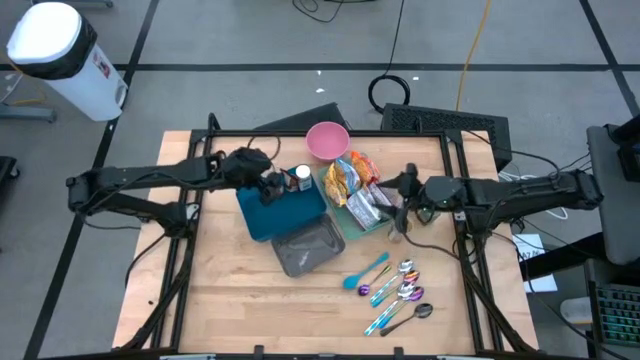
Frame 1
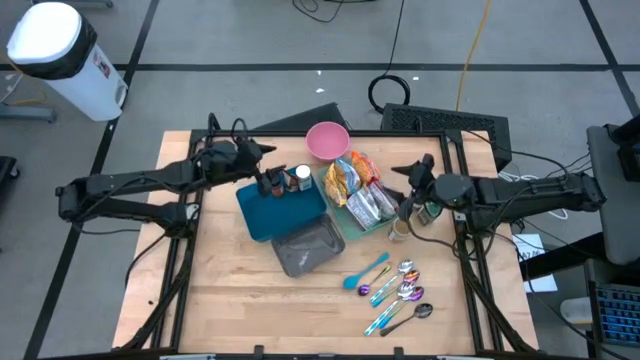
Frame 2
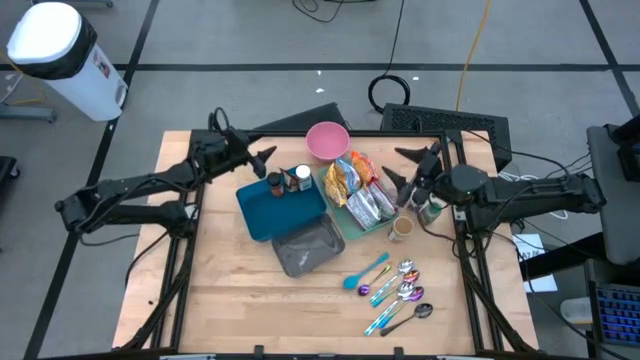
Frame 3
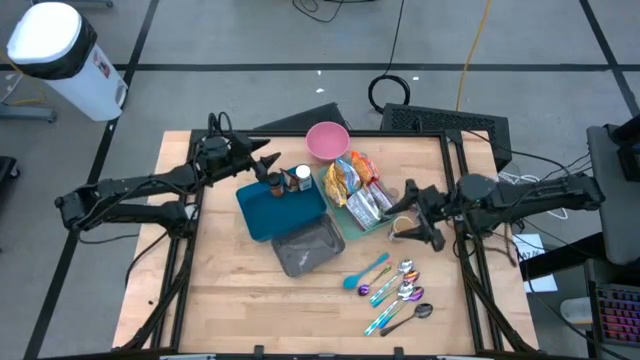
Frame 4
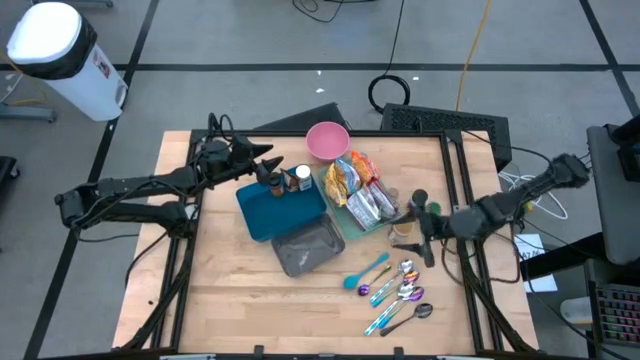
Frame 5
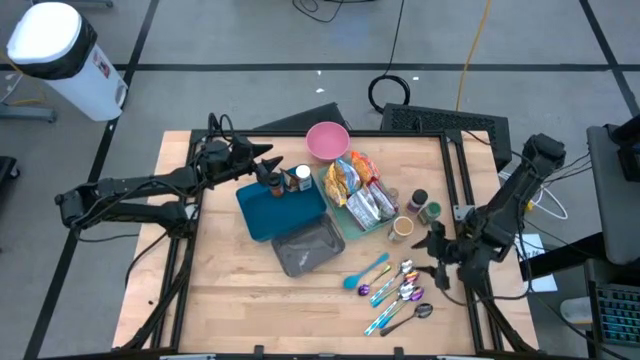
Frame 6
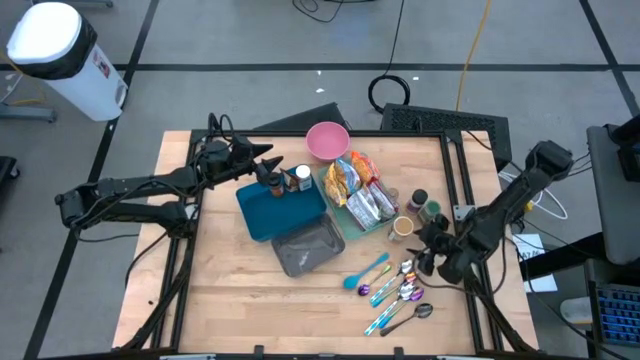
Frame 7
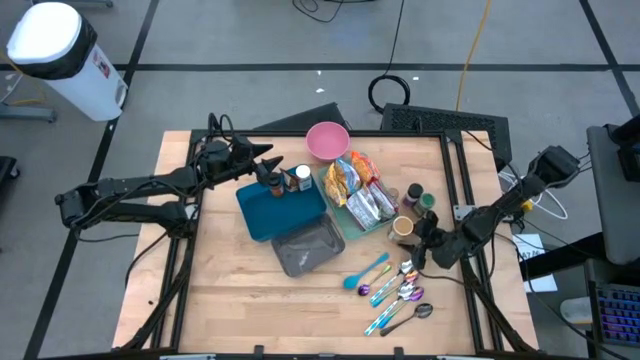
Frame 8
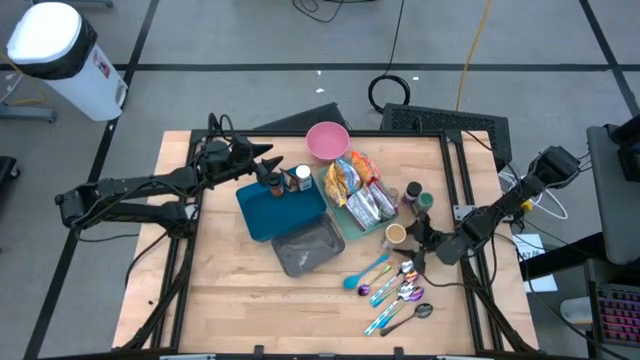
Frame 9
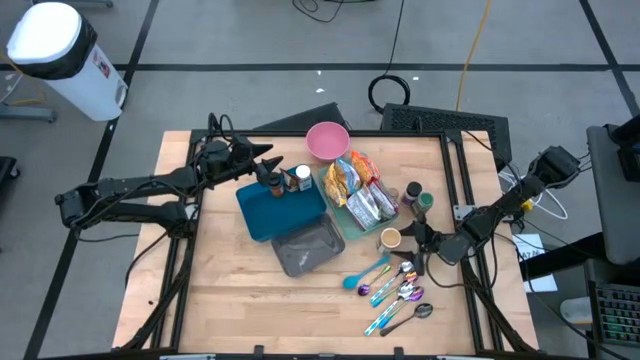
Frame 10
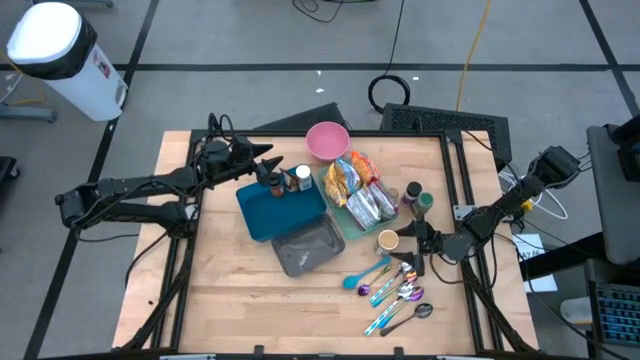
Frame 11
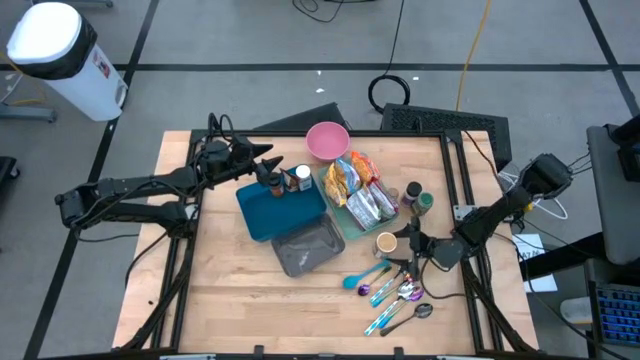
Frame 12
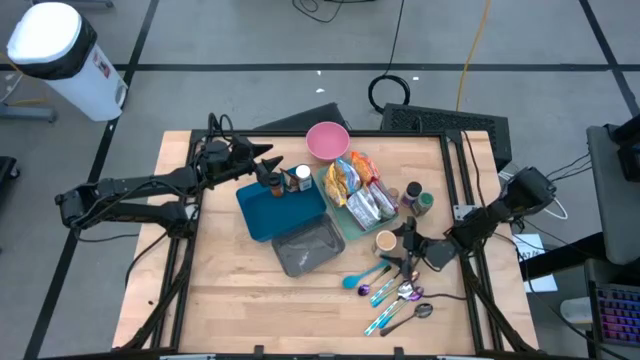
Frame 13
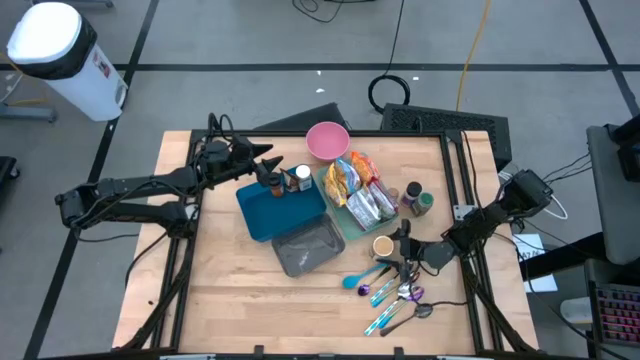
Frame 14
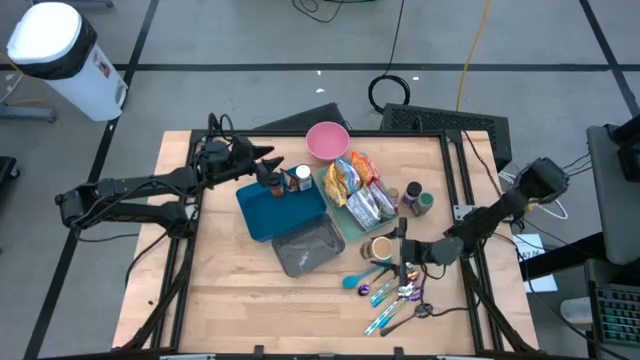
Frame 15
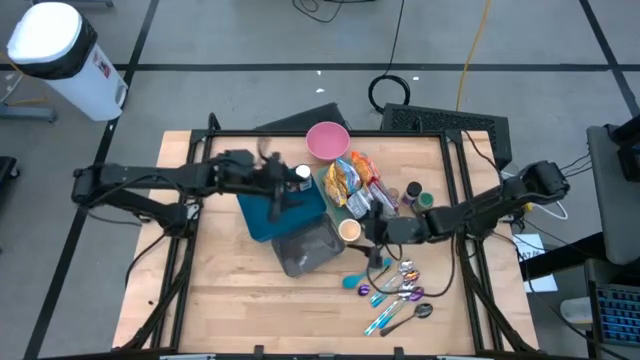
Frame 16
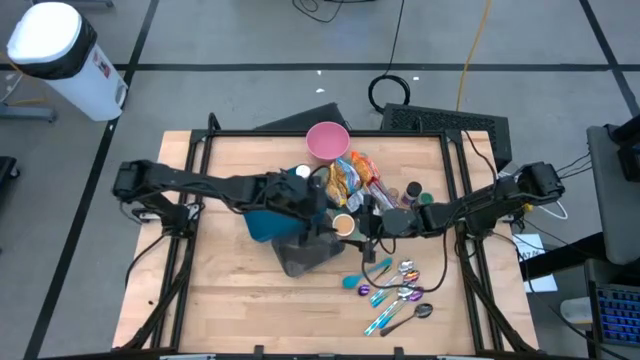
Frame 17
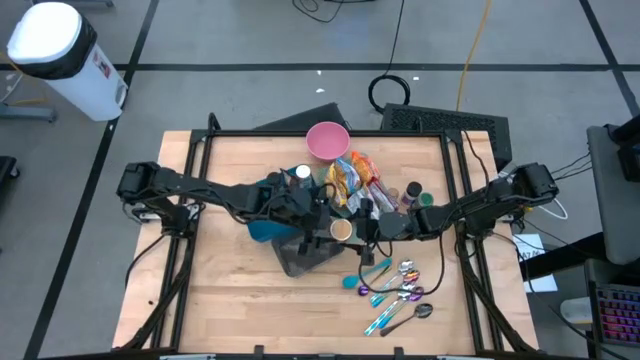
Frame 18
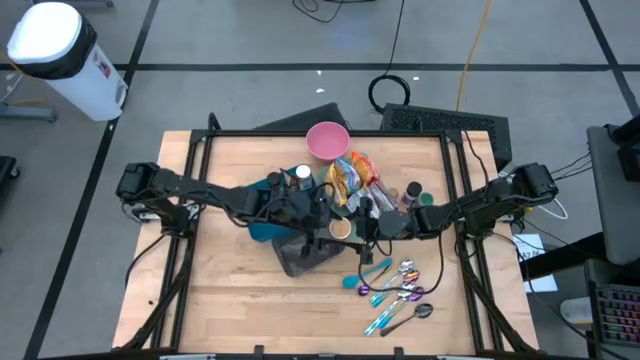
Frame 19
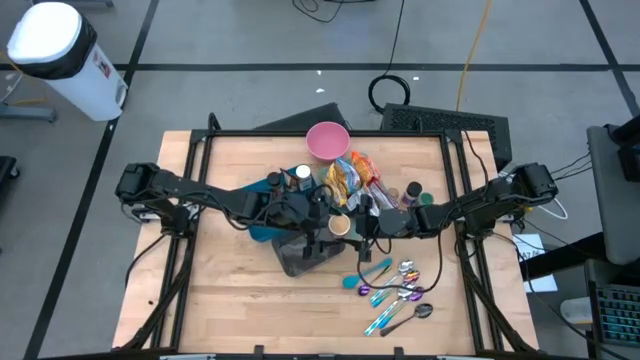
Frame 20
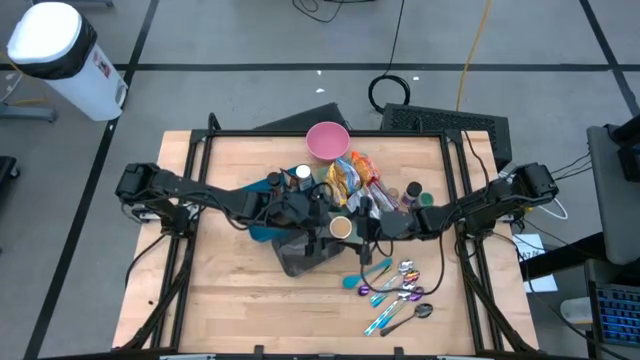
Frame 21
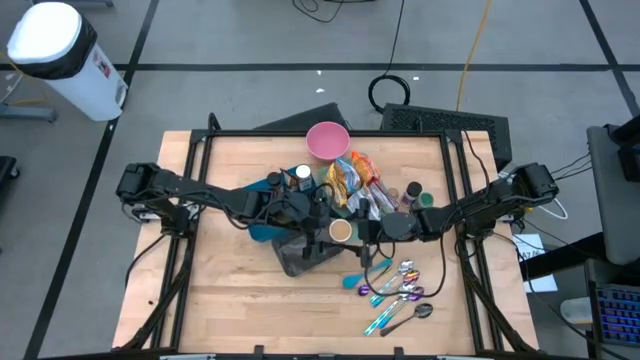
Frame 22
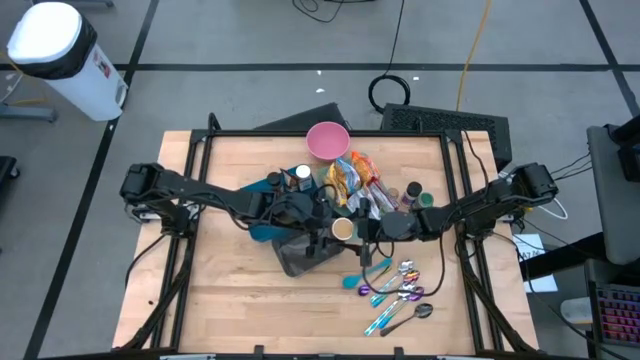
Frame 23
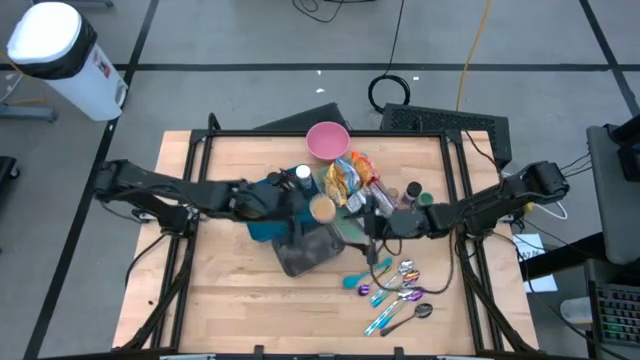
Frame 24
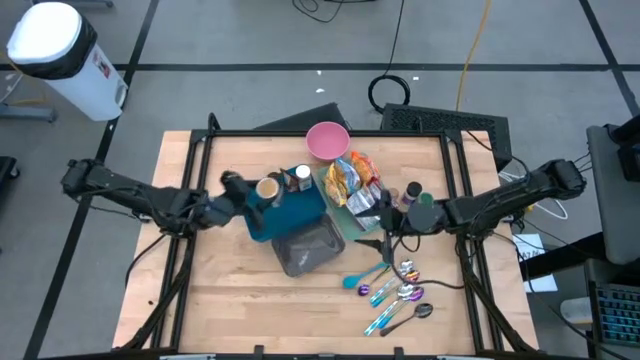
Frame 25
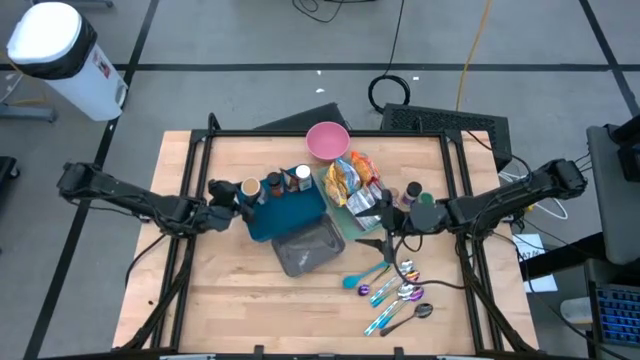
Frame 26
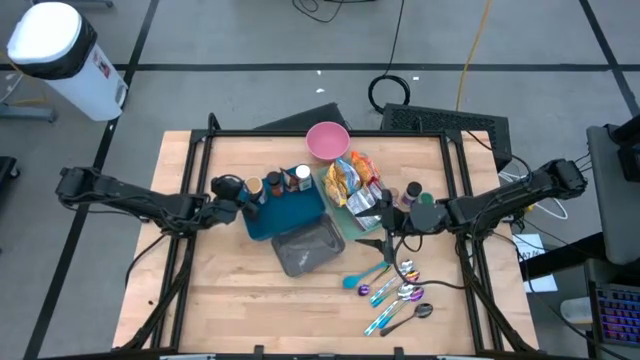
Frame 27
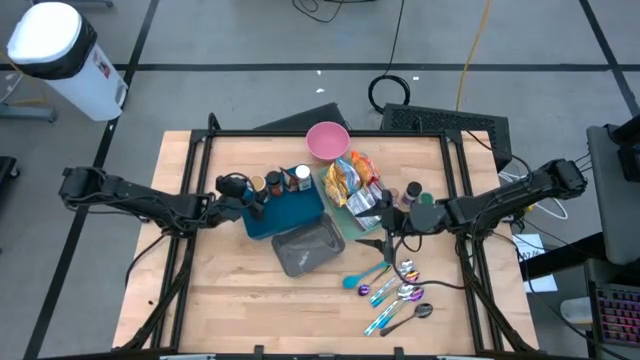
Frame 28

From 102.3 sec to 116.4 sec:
Task: Pick & Place Food Item
Put the gold seasoning bottle into the blue bin

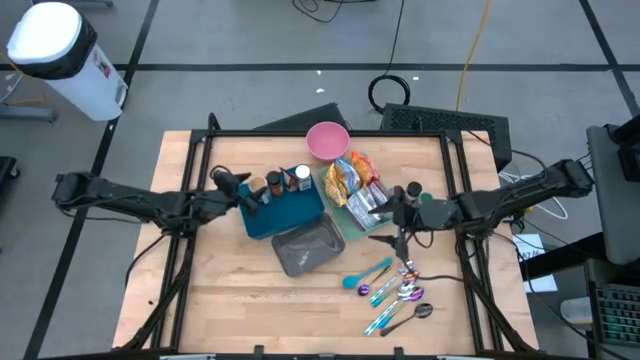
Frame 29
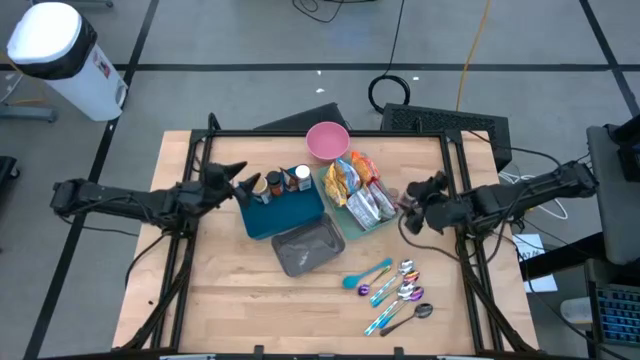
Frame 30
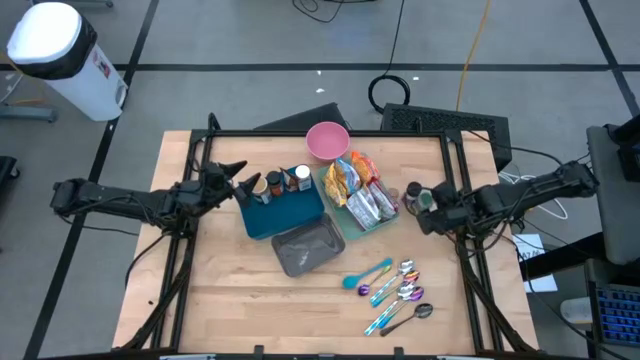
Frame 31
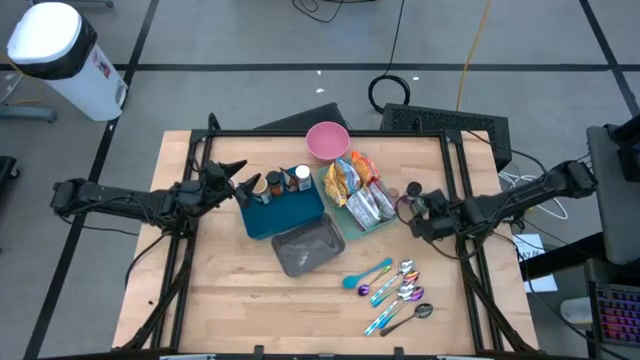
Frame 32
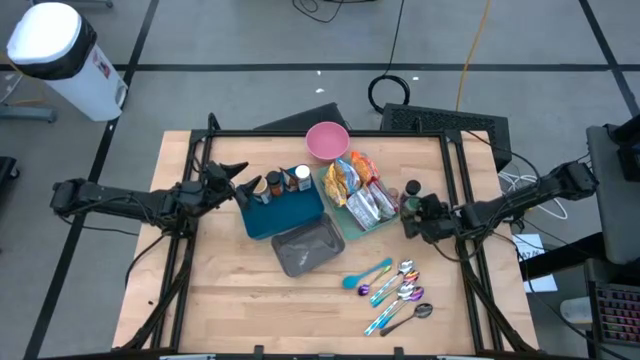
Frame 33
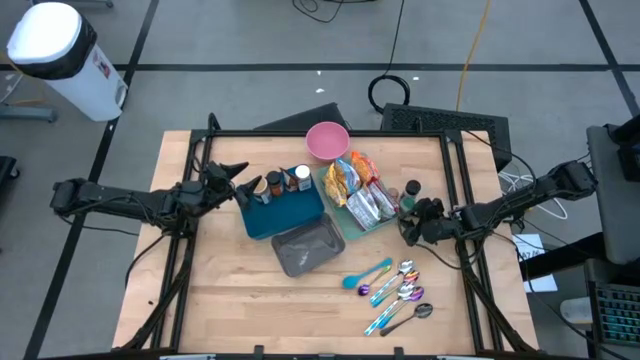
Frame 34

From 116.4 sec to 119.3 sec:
Put the green seasoning bottle into the blue bin

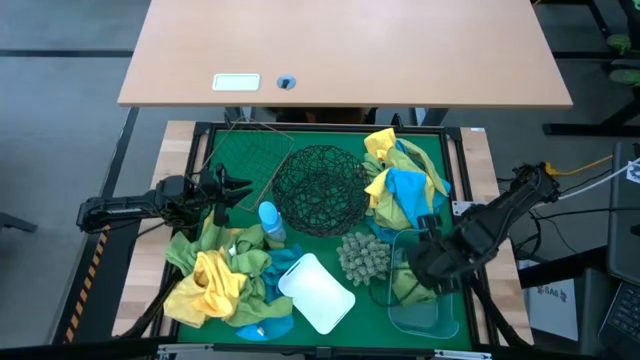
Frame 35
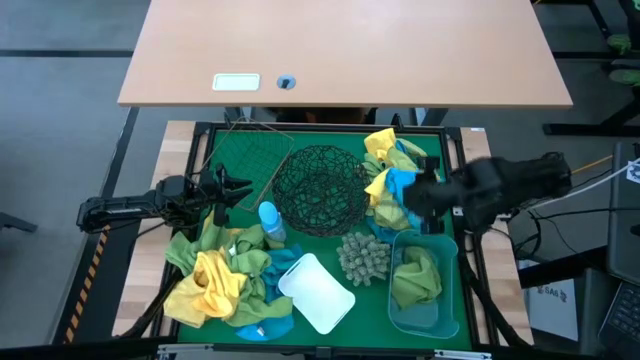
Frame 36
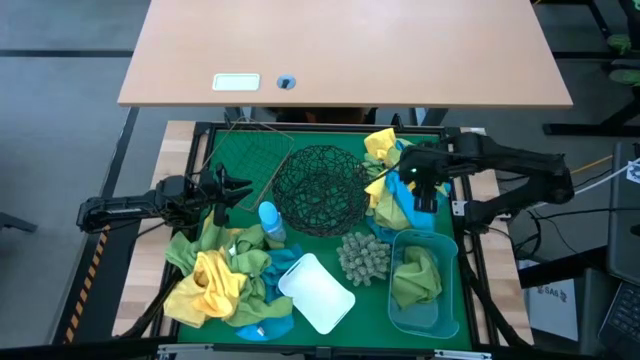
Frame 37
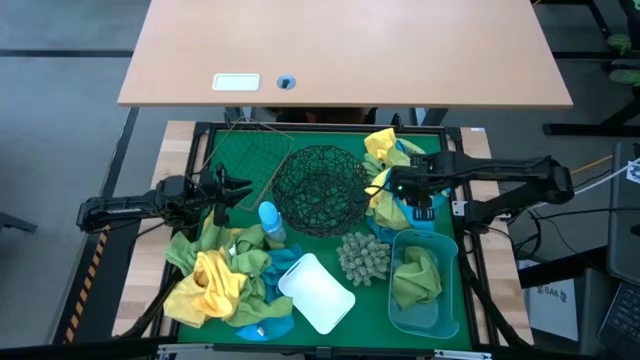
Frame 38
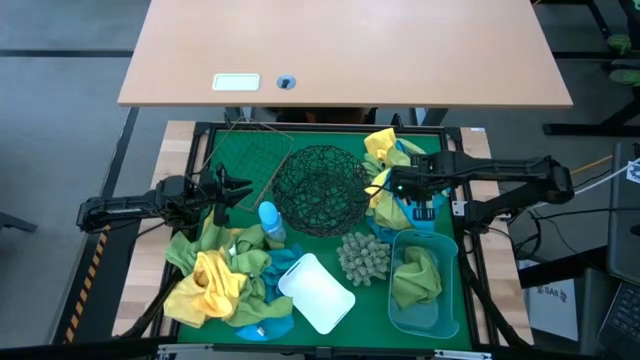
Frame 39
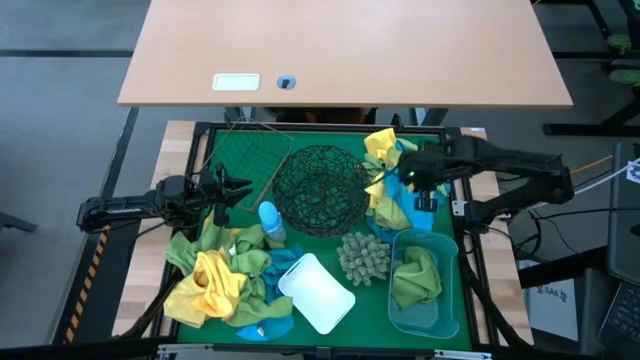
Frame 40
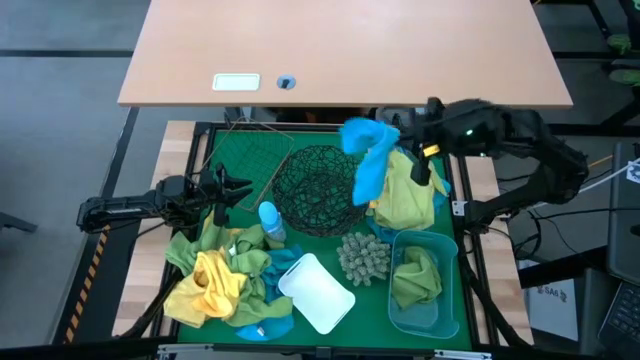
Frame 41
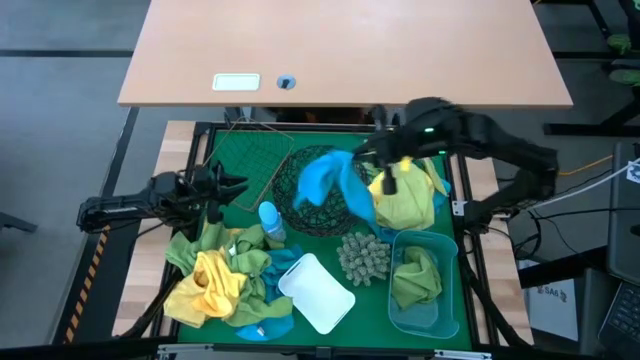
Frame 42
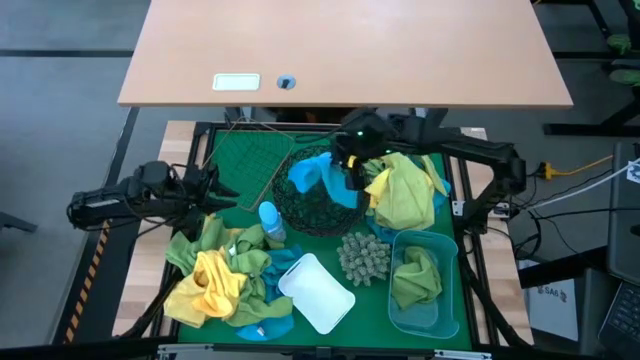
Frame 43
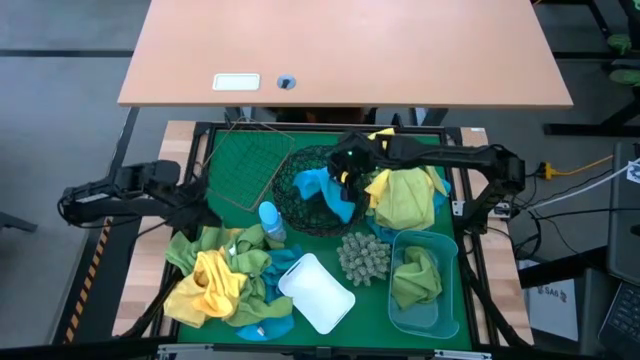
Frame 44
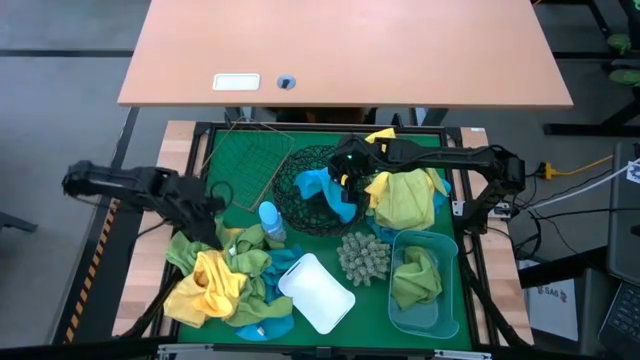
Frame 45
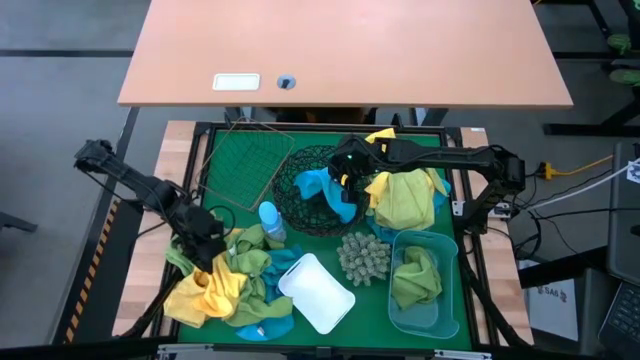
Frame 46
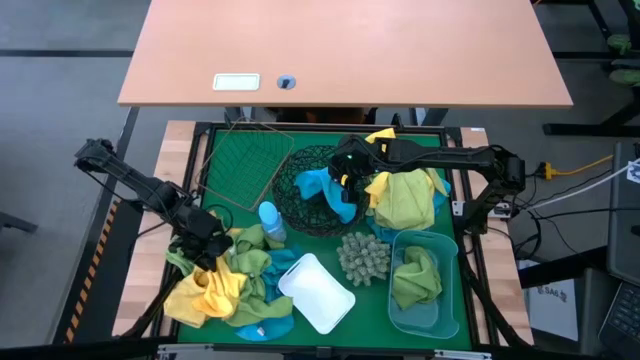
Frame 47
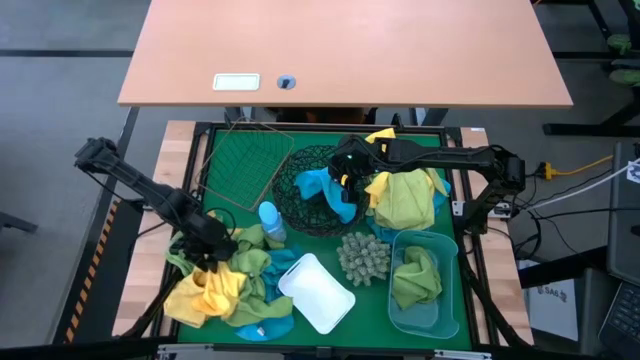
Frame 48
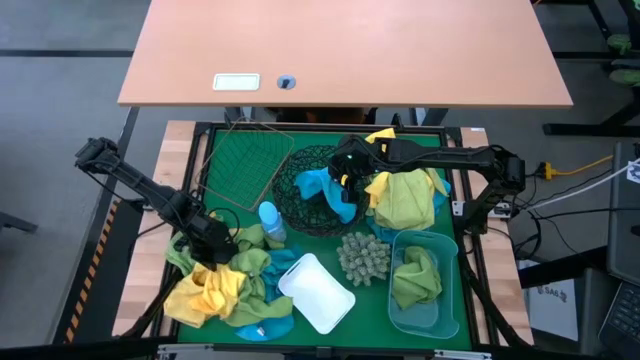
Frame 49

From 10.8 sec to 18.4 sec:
Task: Sort microfiber towel by color & place in baskets
Put the blue microfiber cloth into the circular wire basket
